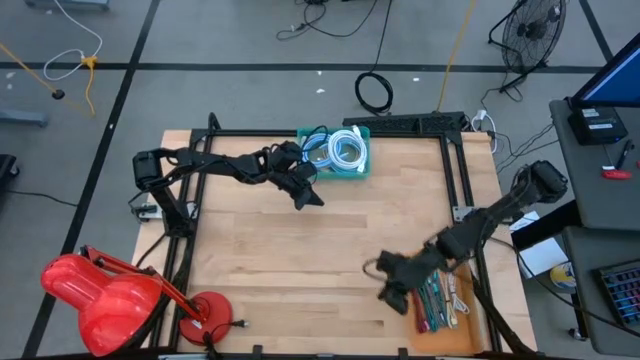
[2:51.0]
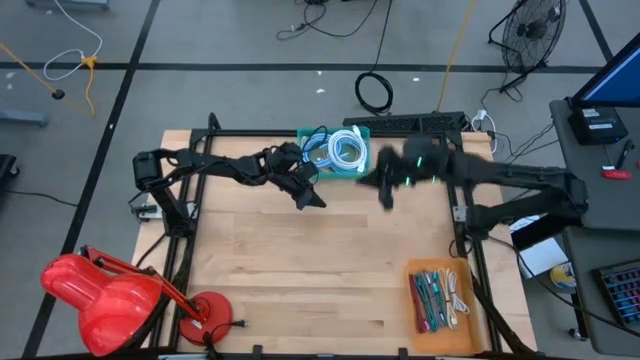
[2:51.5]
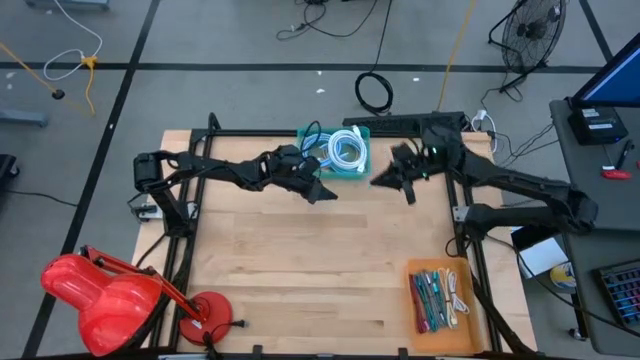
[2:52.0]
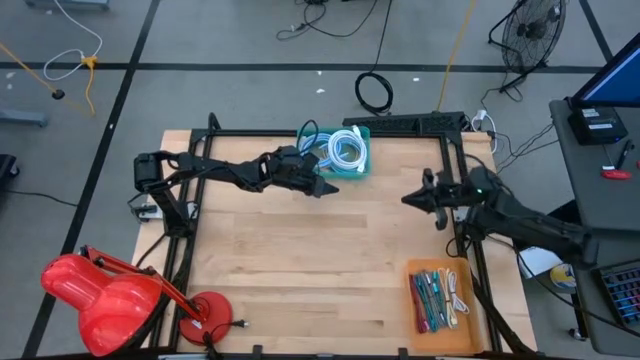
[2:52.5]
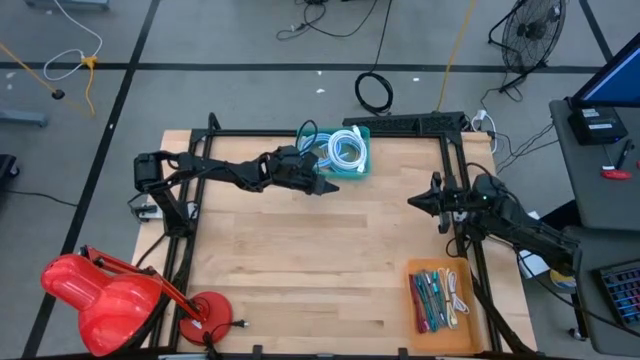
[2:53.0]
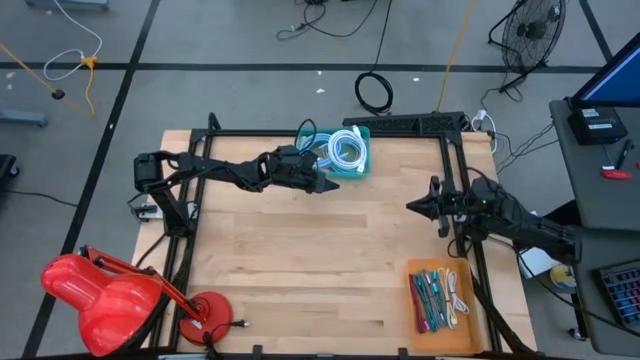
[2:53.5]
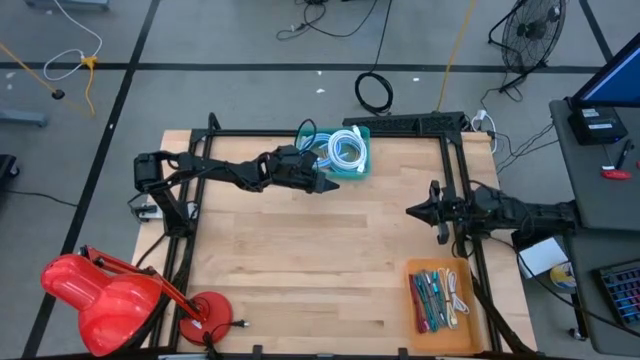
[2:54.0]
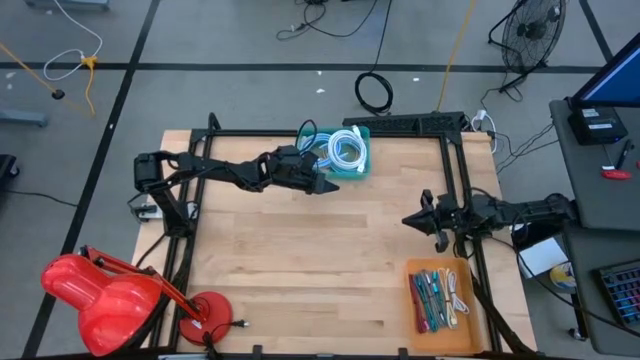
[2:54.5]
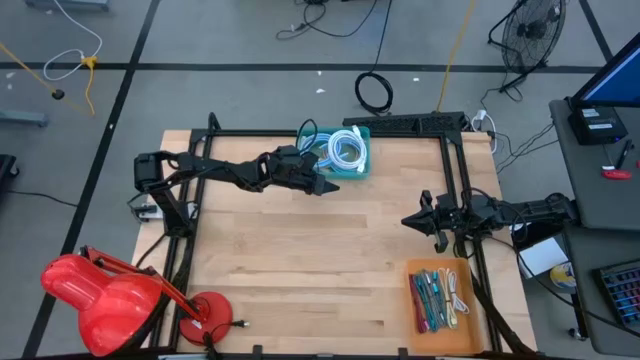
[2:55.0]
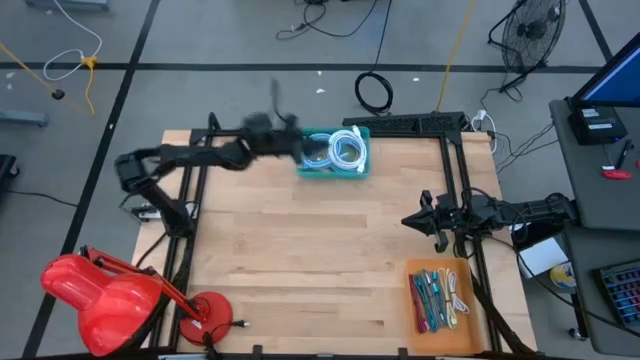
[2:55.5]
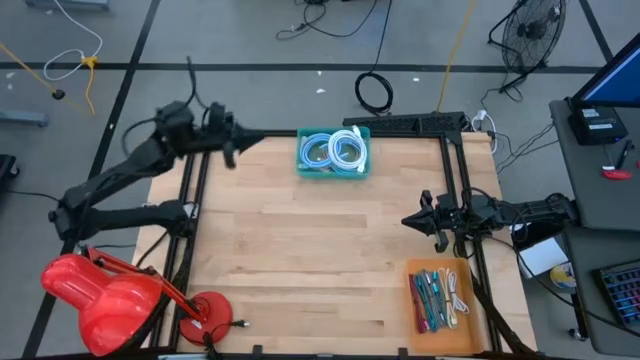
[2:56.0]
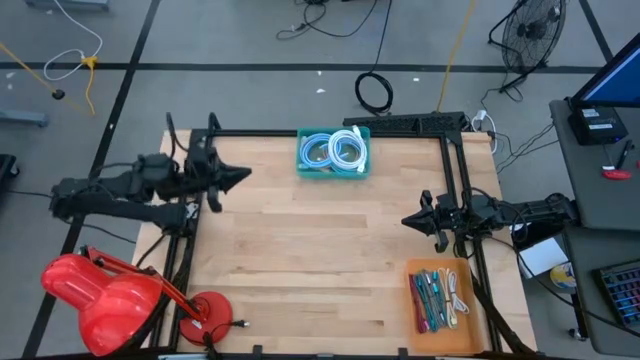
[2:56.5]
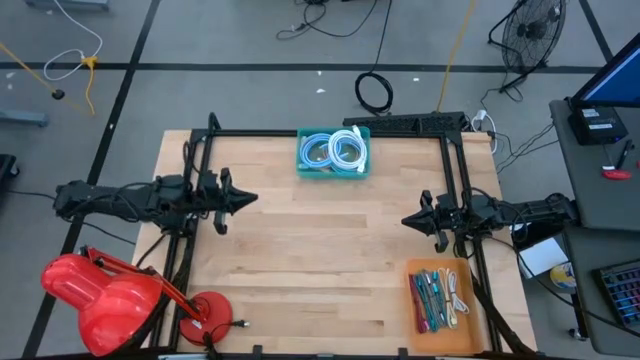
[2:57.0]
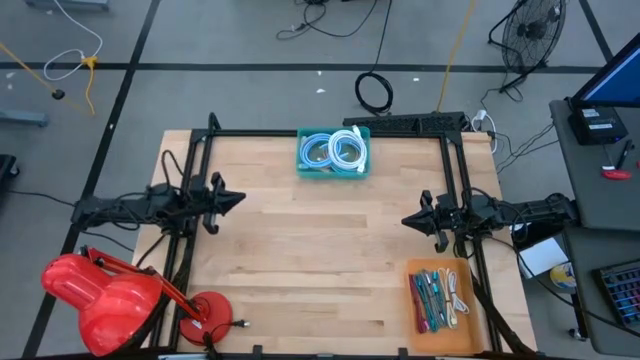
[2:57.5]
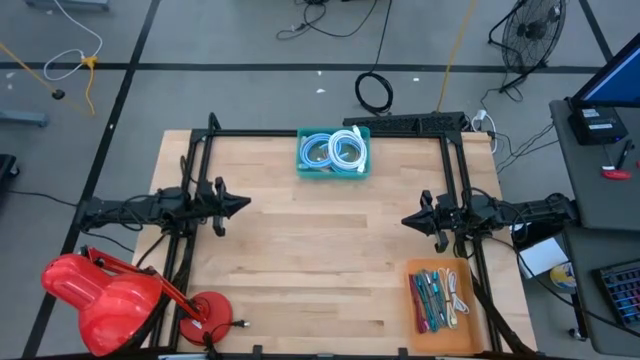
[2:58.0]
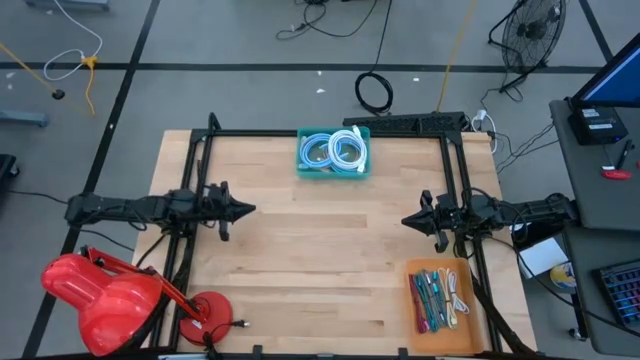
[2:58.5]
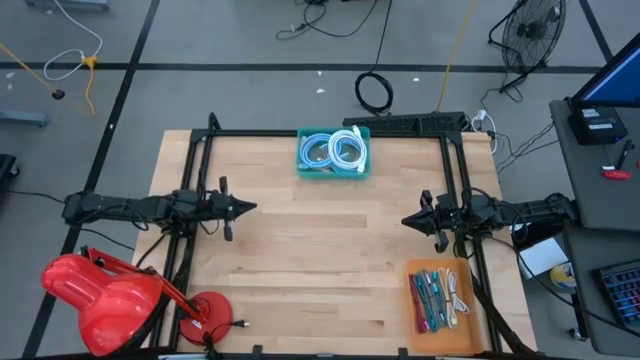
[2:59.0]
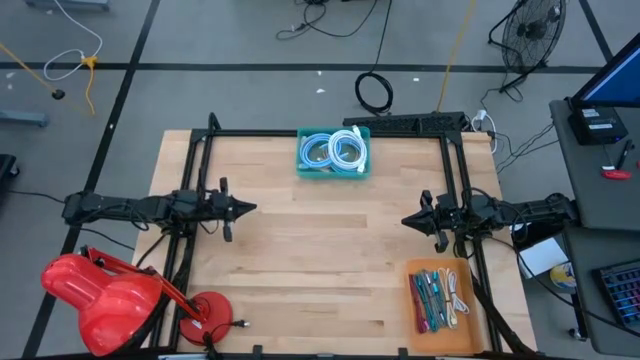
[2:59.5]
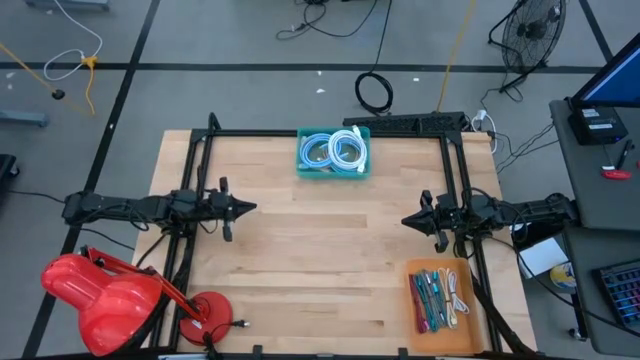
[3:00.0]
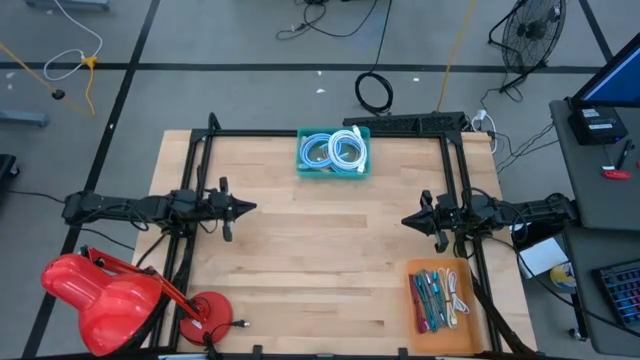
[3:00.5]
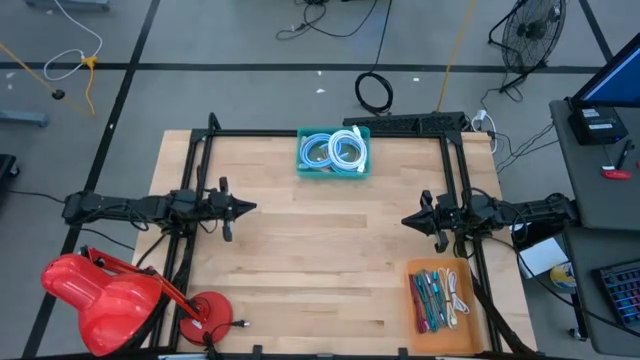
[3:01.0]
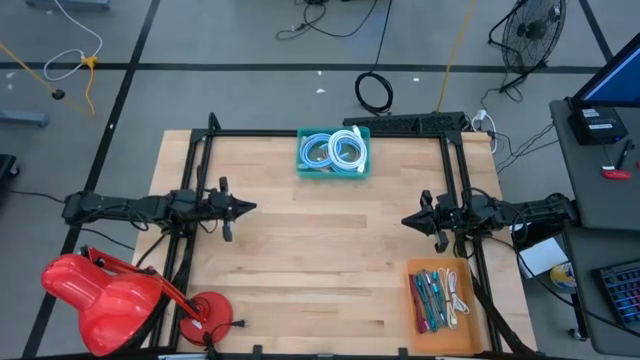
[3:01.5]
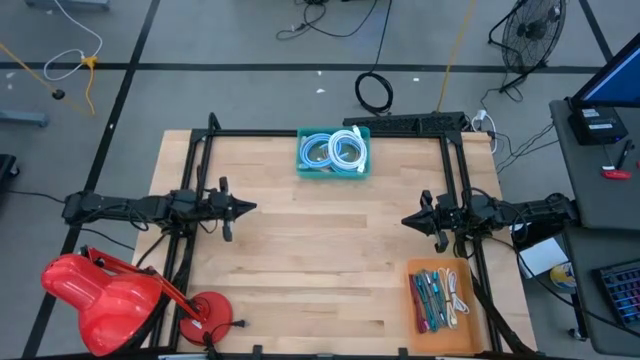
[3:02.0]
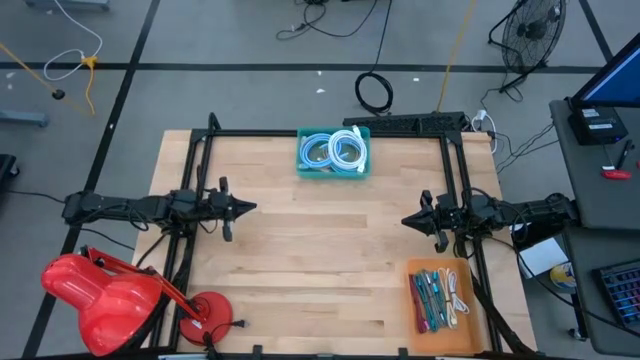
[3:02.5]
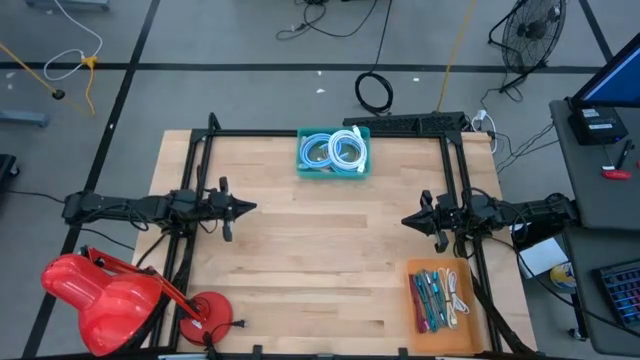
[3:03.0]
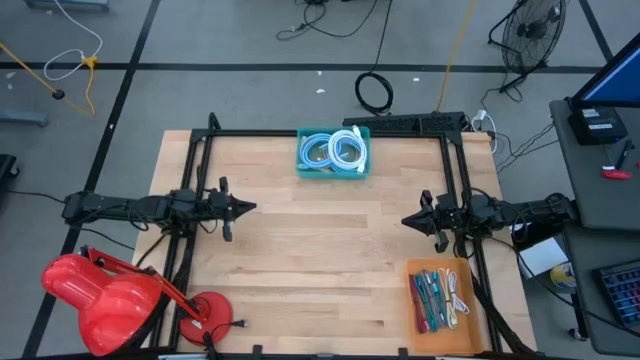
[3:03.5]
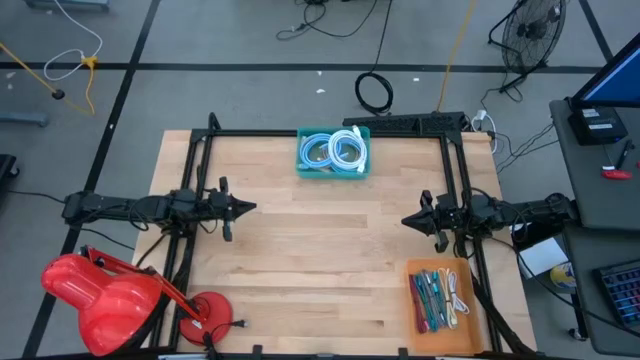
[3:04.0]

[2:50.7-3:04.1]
Task: Pick & Place USB Port
Return to Home Position

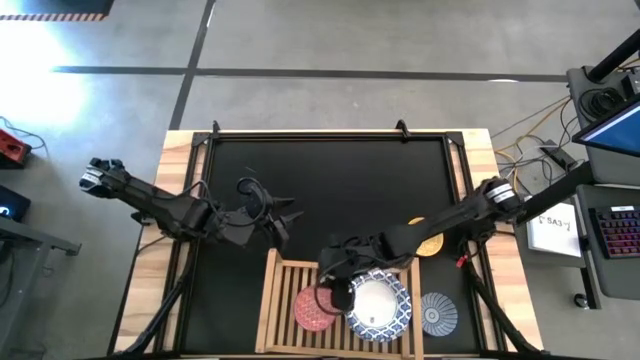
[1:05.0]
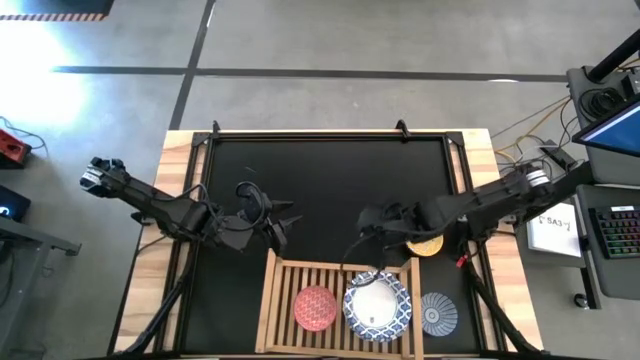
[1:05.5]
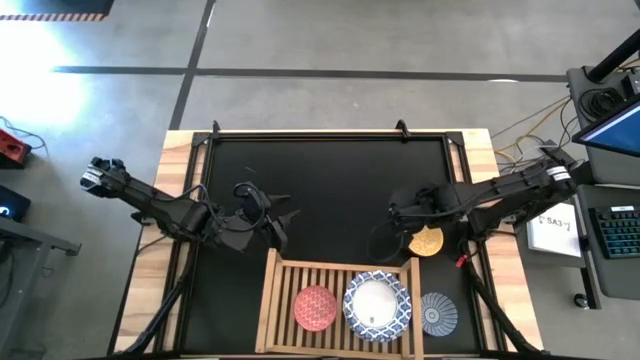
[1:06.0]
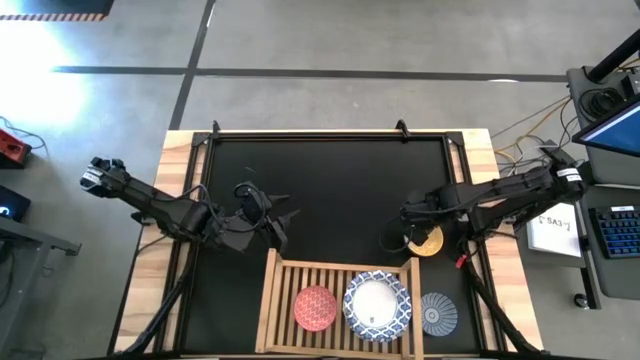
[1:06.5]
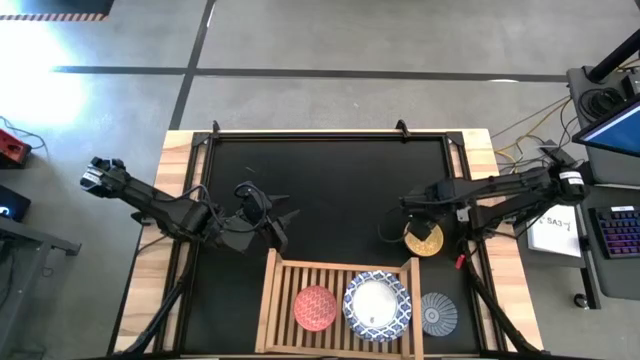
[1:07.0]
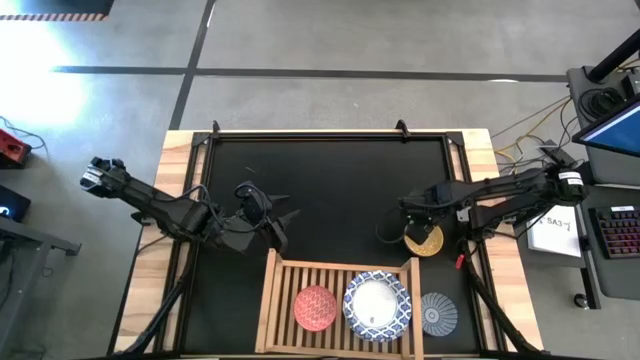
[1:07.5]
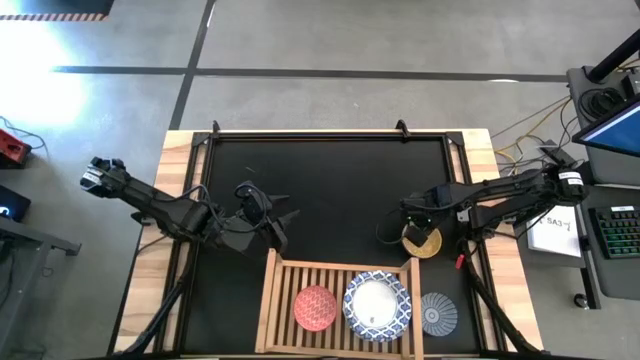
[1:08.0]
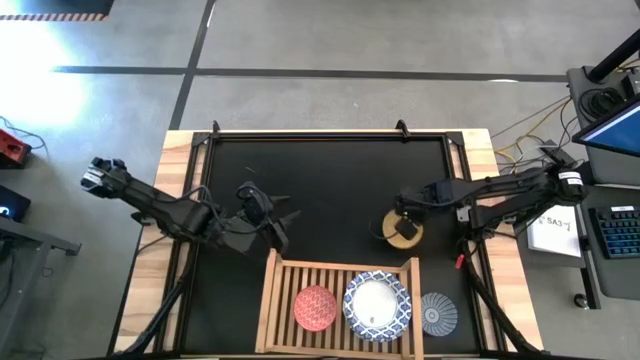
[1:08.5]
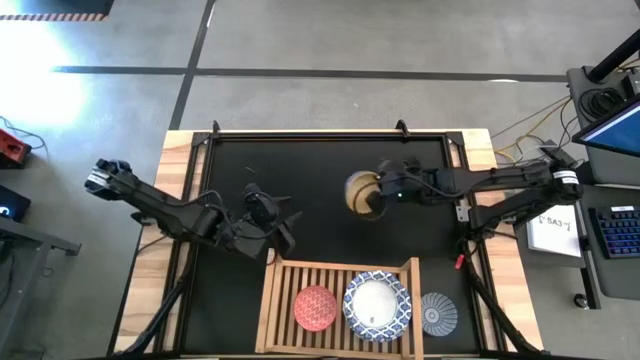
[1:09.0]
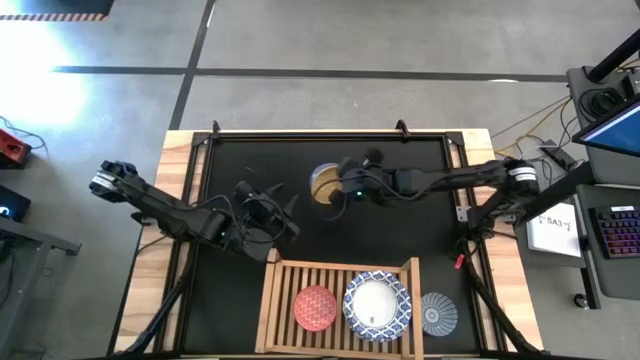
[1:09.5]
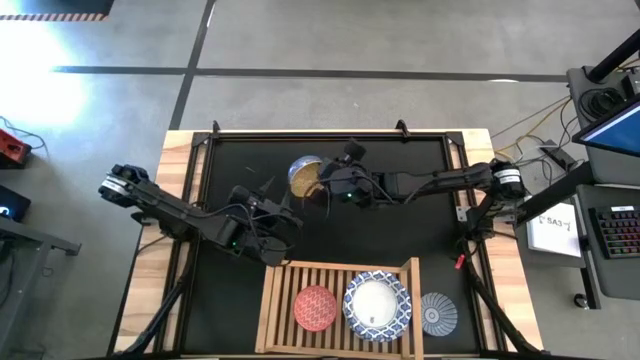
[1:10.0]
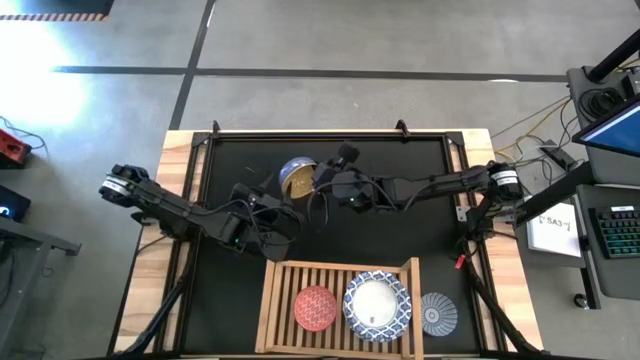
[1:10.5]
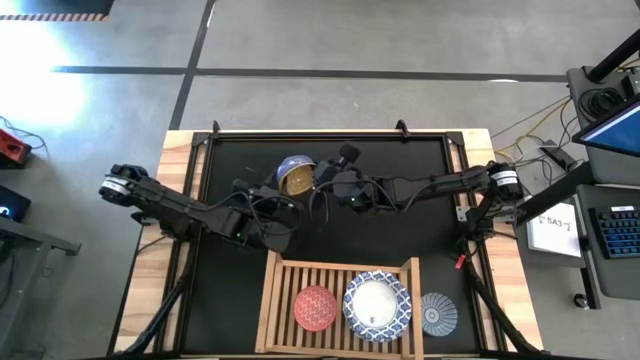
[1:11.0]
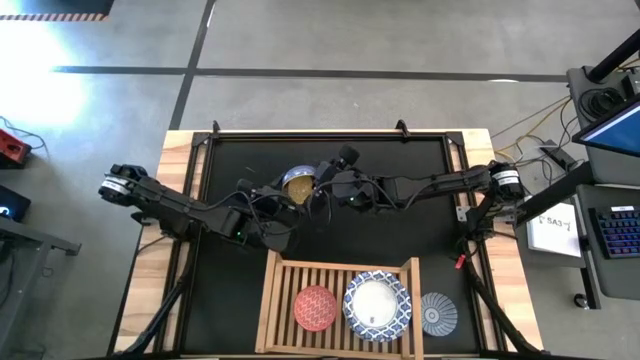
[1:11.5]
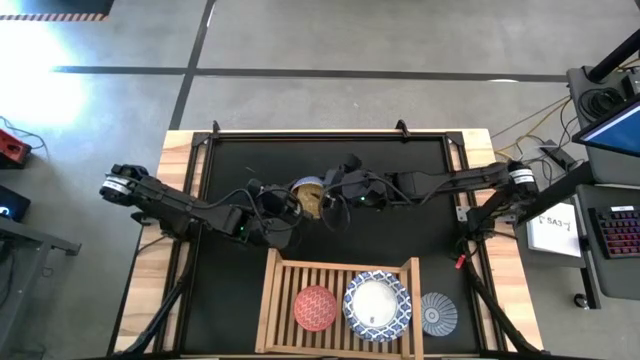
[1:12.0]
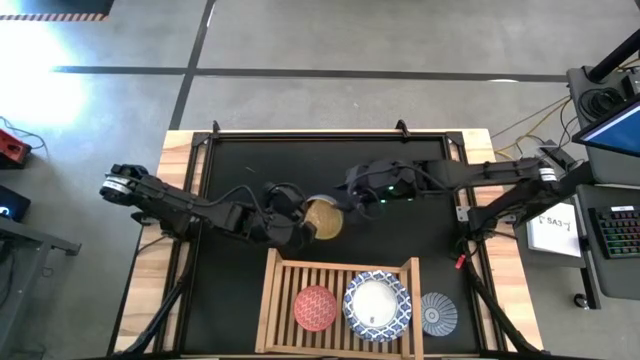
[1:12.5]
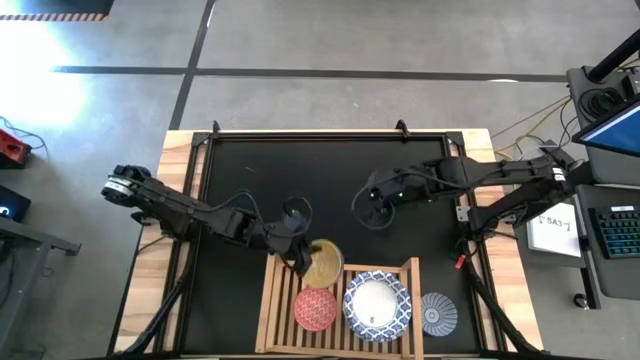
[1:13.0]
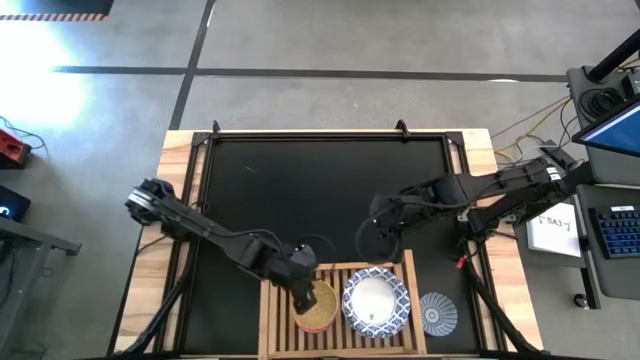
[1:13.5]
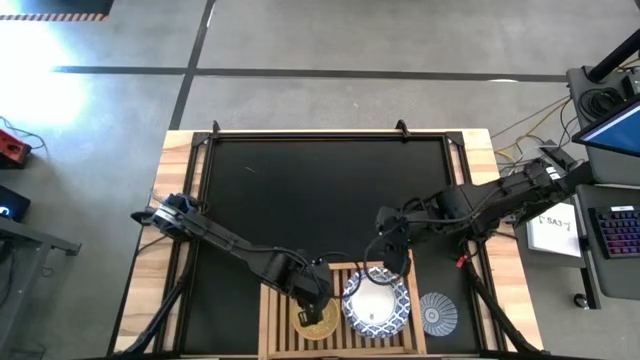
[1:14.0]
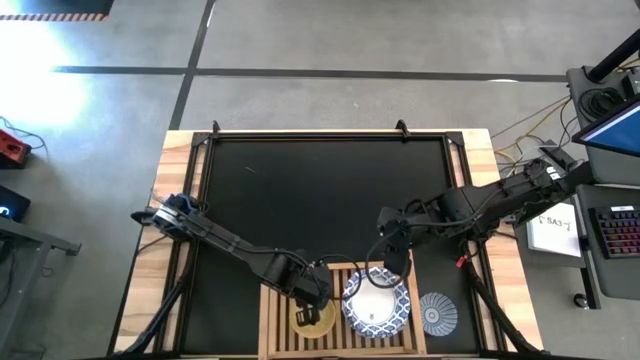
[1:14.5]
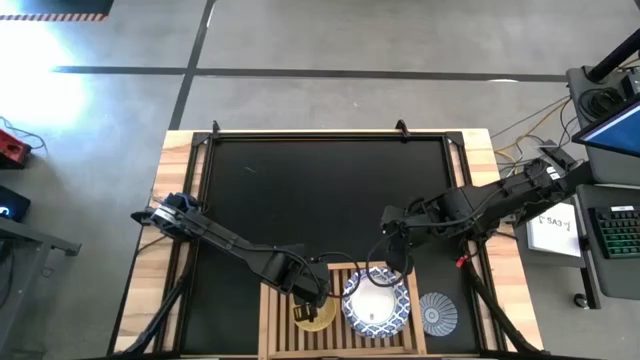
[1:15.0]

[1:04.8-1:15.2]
Task: Place and stack bowls onto a shelf
Stack the yellow patterned bowl on top of the red patterned bowl on the shelf
